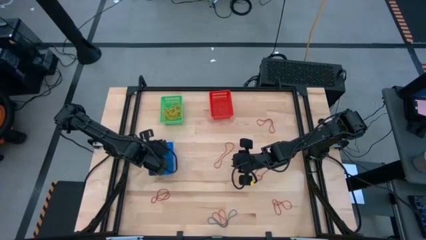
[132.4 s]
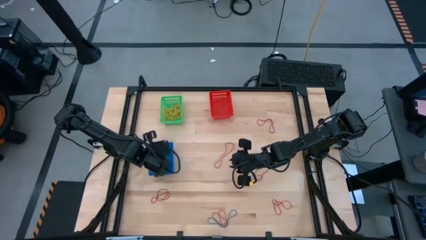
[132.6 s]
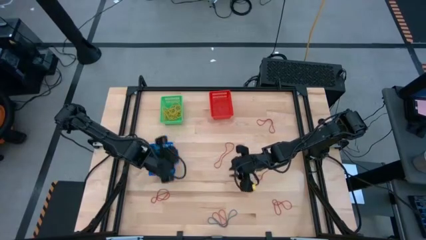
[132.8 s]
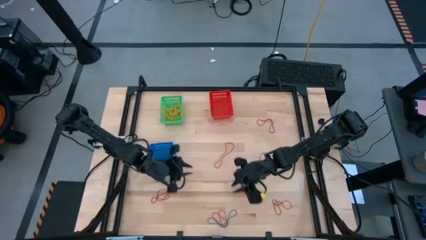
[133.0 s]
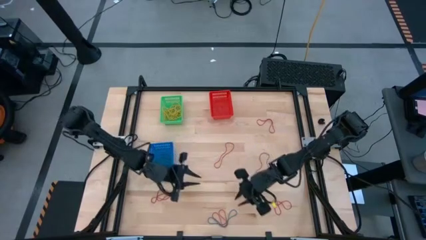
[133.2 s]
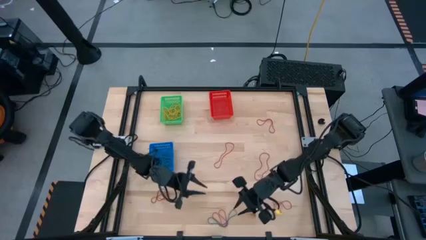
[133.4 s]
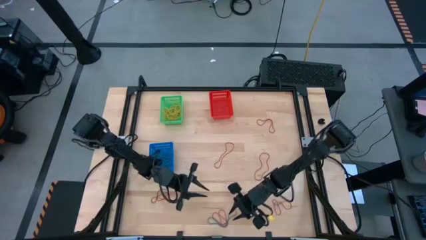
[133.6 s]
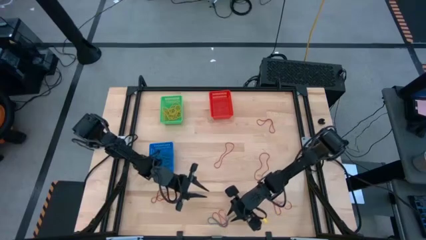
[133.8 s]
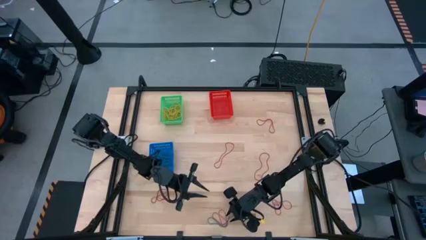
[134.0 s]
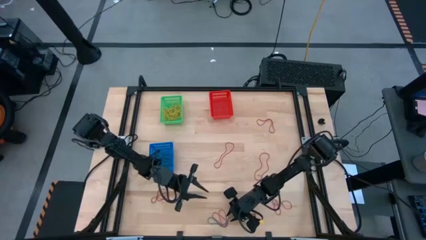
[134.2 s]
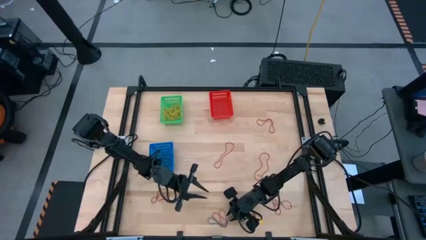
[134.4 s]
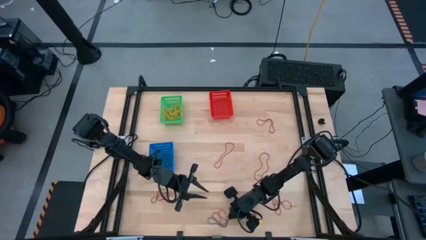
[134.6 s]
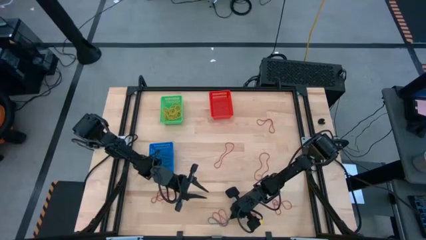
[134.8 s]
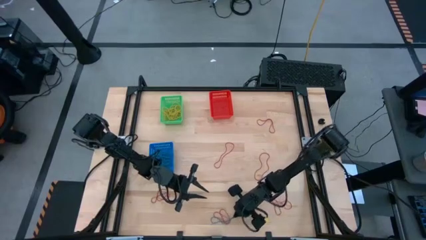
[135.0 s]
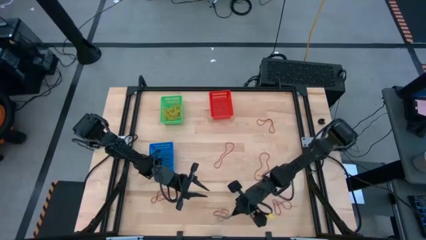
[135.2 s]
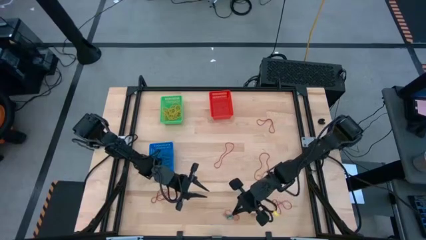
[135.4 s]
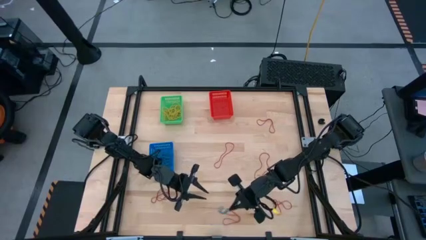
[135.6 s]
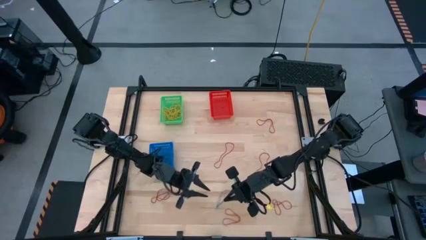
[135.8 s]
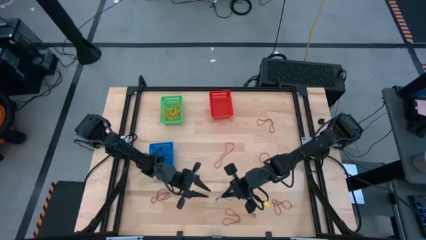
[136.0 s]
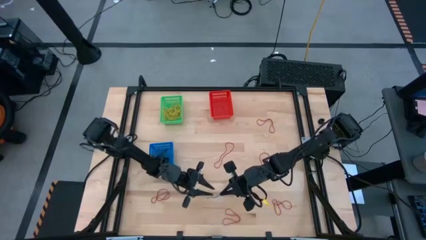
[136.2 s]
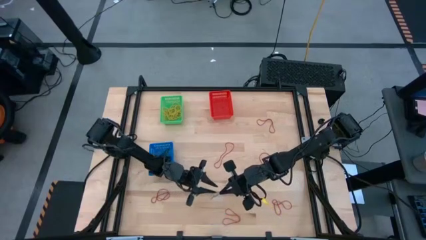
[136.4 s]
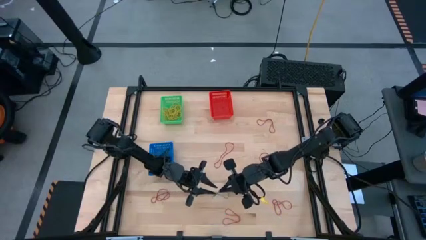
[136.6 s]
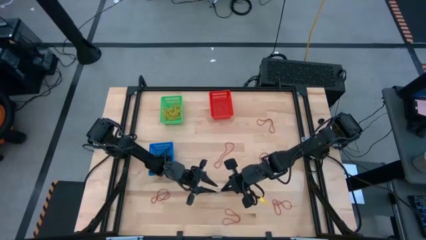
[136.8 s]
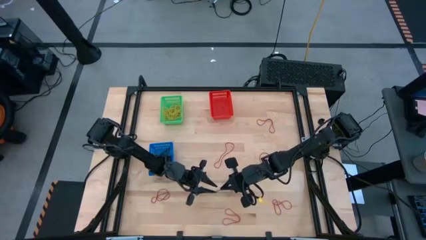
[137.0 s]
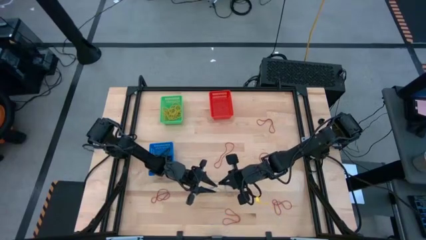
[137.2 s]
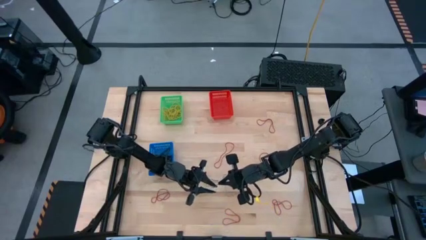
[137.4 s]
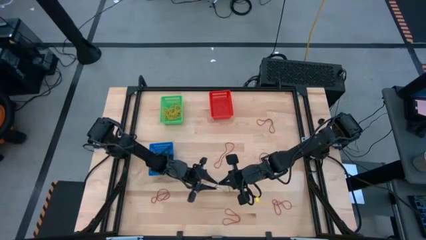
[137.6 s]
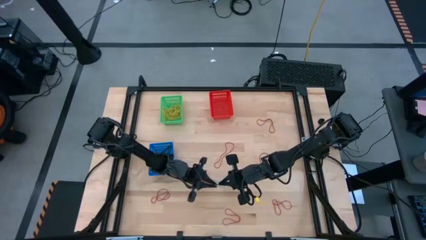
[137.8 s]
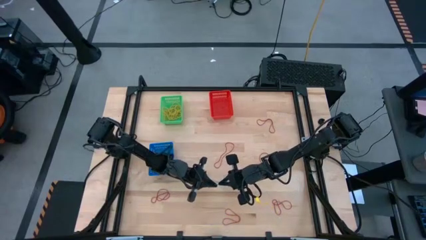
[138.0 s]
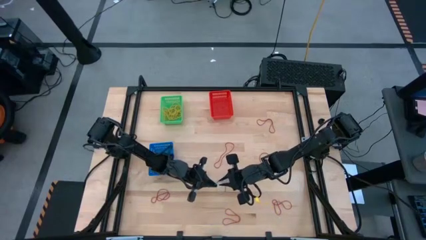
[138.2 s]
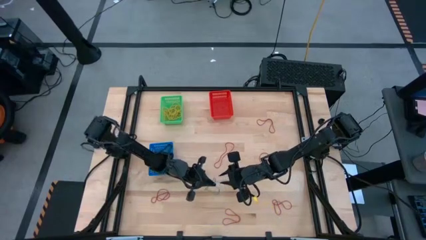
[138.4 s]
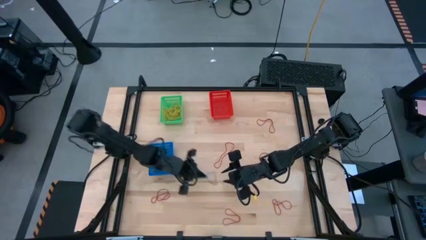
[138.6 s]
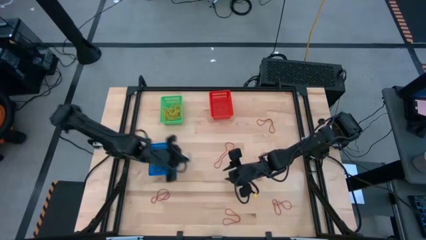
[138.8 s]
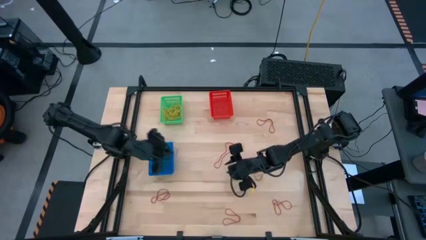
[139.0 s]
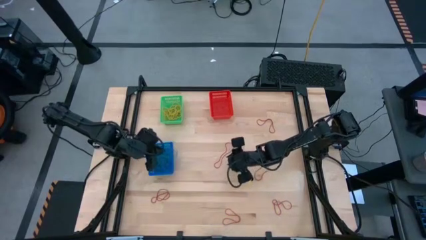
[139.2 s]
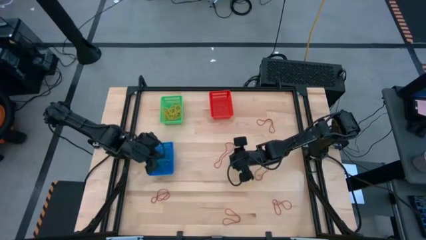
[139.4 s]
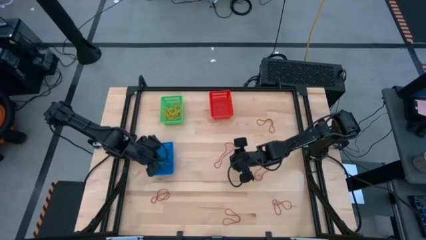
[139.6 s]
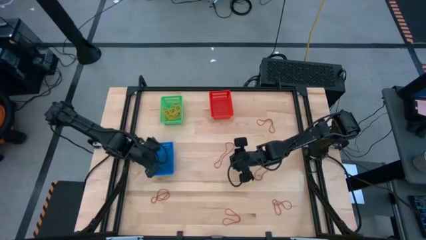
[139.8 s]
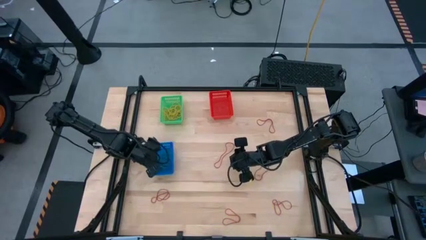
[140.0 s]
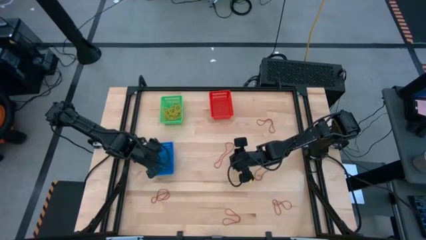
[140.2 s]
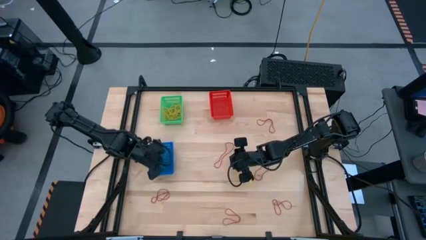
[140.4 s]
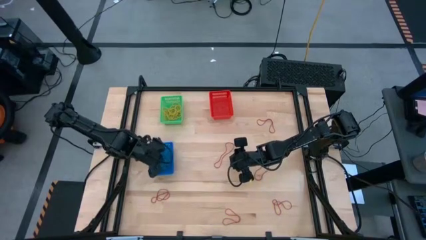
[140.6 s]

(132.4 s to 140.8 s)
Task: Sort rubber bands into baskets
Put the blue rubber band into the blue bin

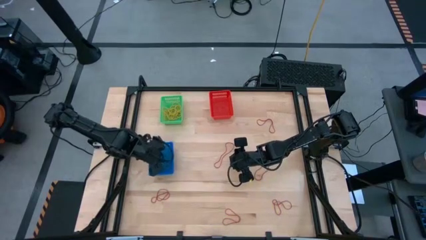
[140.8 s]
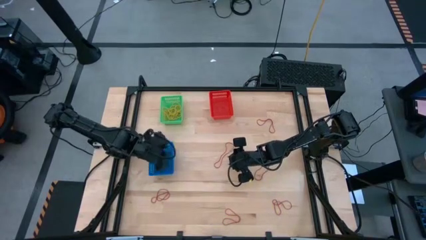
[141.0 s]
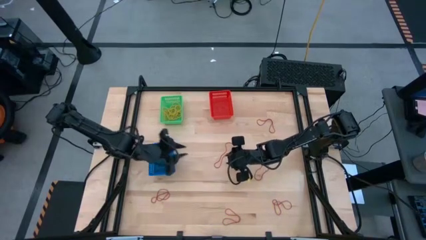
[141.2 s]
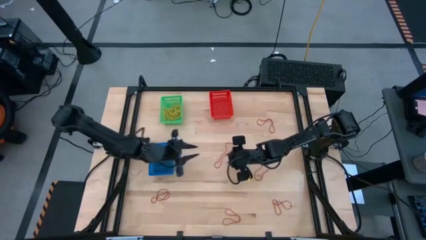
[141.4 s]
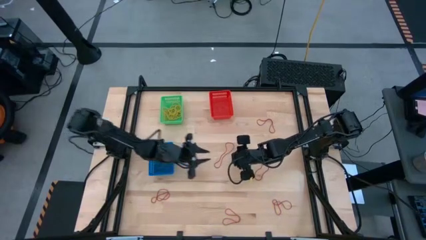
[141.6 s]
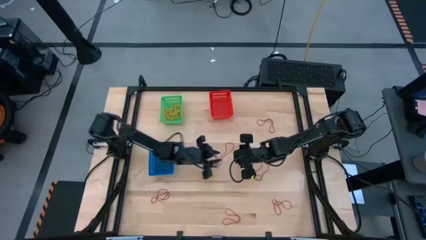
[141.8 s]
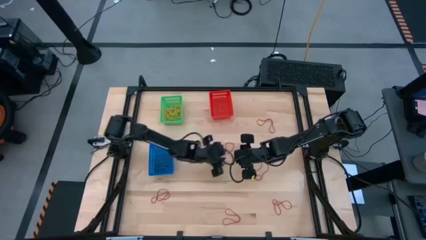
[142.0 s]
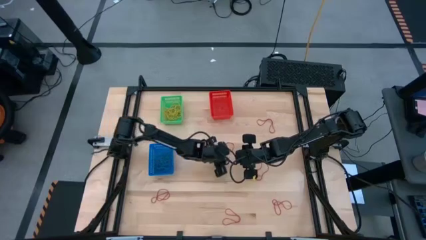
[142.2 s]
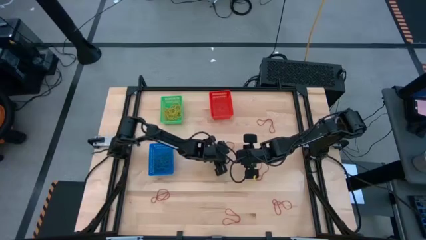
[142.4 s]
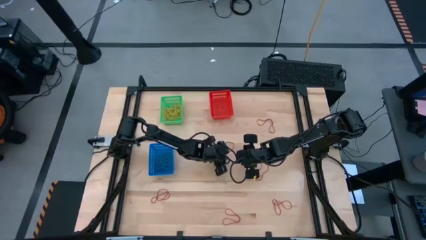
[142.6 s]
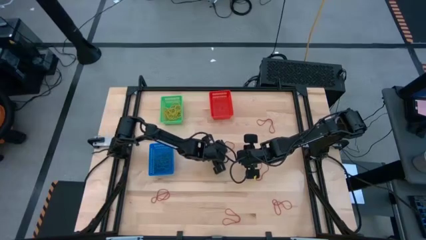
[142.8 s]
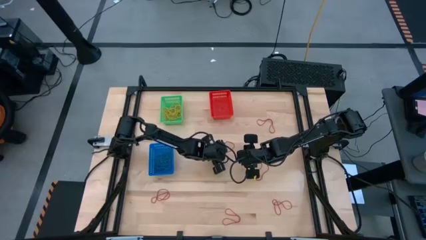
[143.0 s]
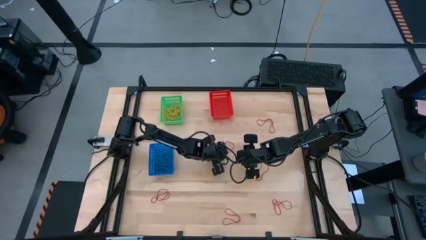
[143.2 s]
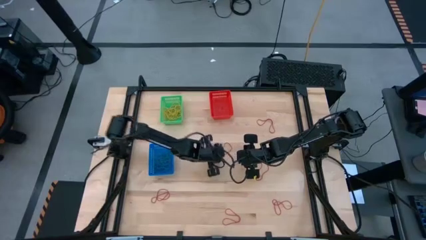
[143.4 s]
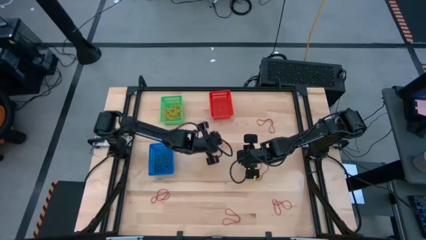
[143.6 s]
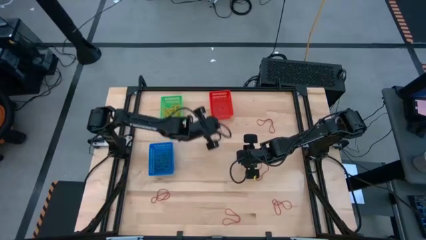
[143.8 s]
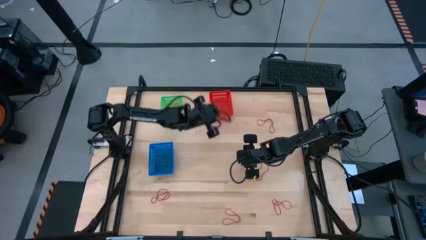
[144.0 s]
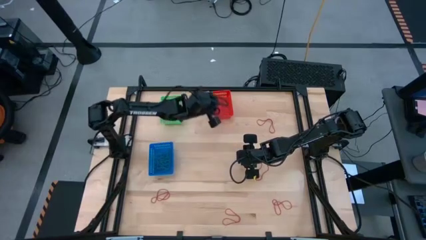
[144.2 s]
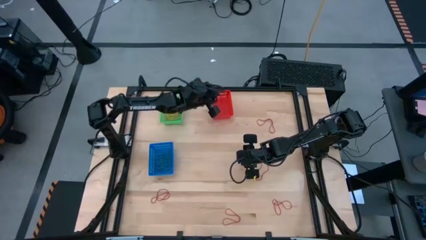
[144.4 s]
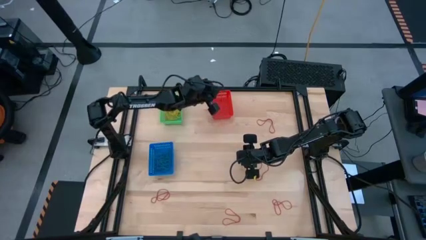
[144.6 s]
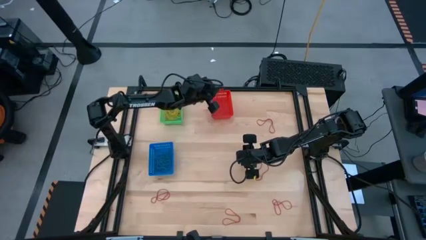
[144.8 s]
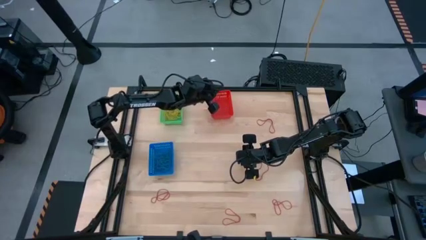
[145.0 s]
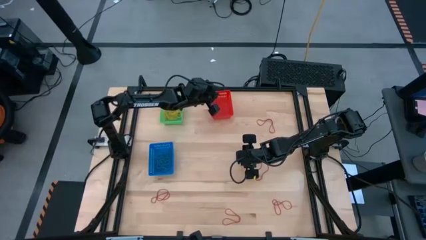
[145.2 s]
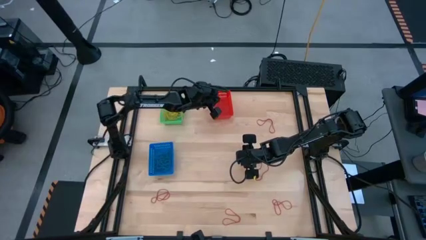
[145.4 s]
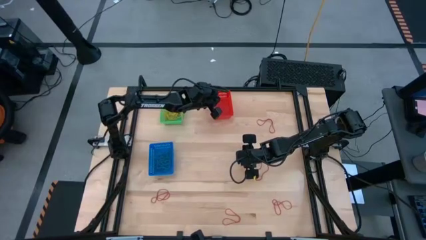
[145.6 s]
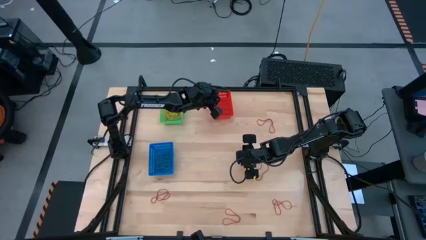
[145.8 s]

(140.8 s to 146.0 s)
Put the red rubber band into the red bin

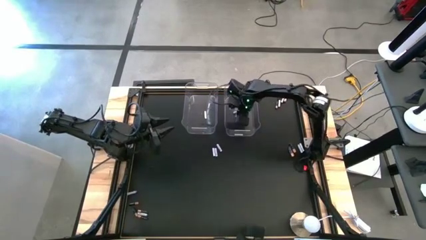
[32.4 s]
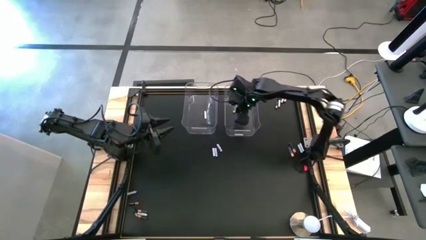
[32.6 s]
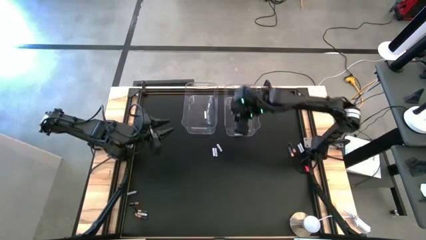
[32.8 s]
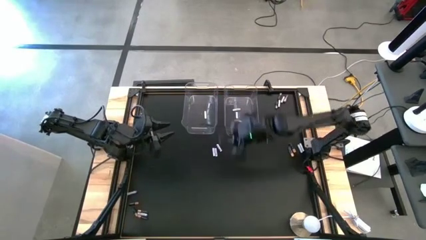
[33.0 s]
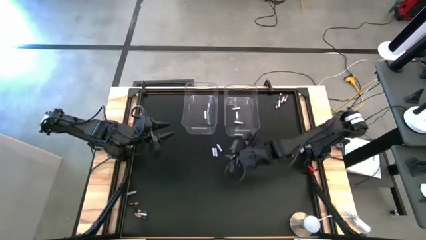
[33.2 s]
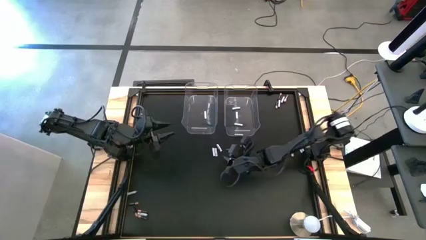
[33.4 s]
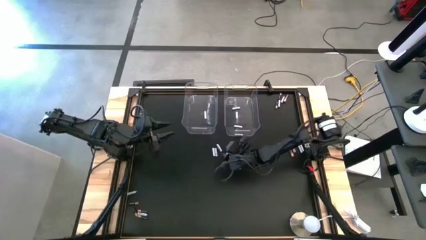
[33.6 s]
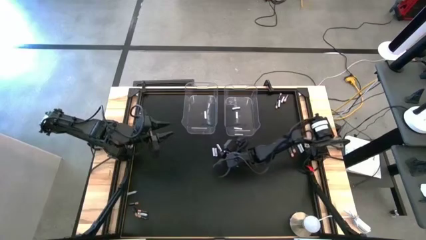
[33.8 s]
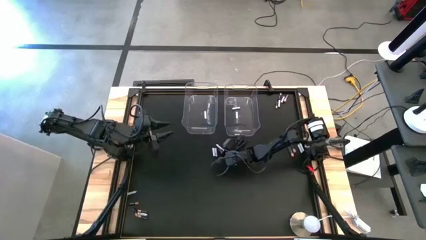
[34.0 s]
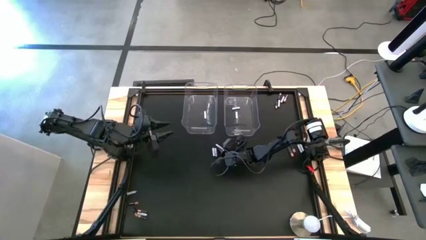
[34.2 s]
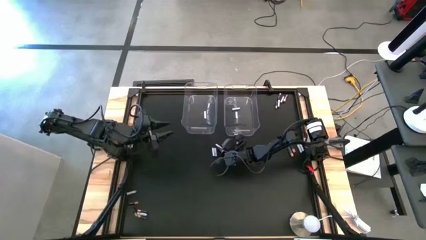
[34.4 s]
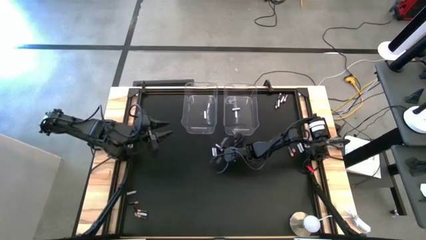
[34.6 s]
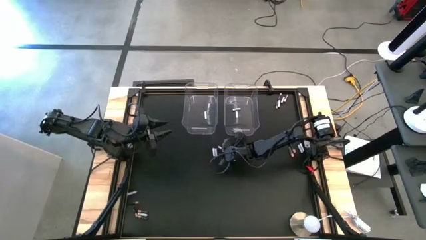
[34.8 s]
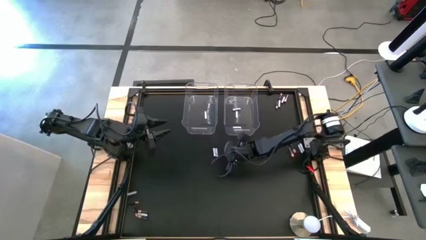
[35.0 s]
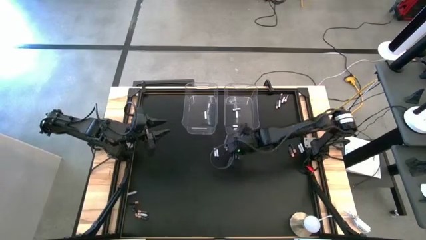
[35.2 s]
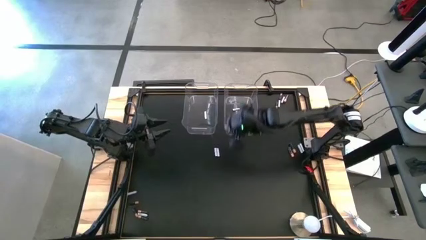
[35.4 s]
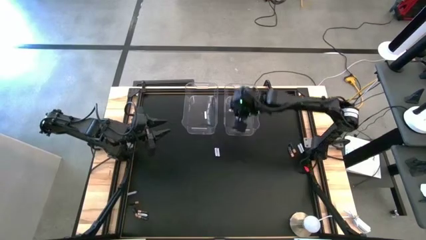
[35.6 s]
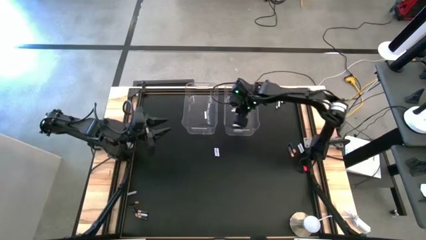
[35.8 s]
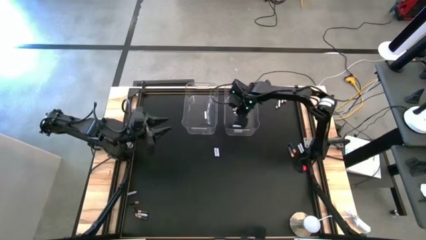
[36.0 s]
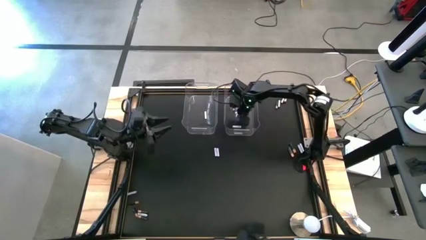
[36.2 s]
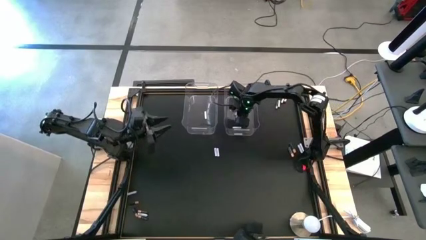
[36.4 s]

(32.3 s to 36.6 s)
Task: Sort batteries
Put the white battery into the right transparent bin
